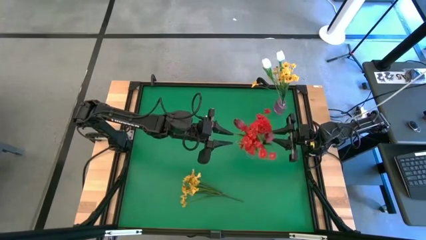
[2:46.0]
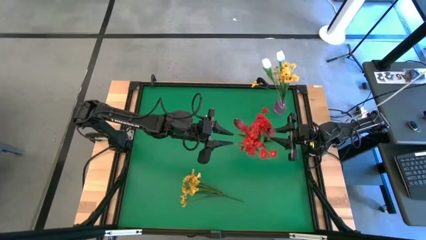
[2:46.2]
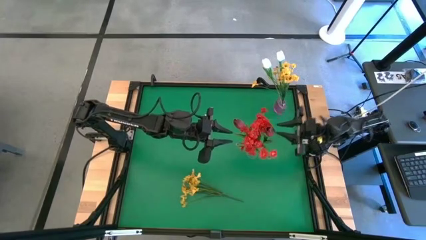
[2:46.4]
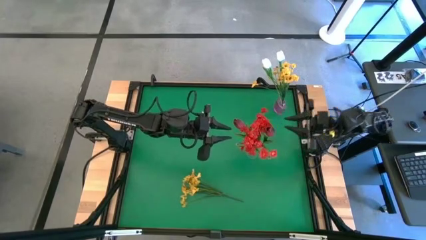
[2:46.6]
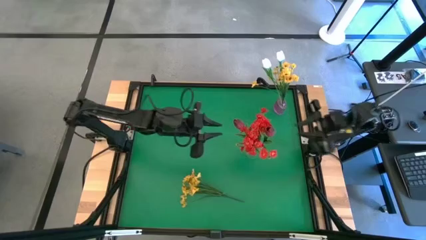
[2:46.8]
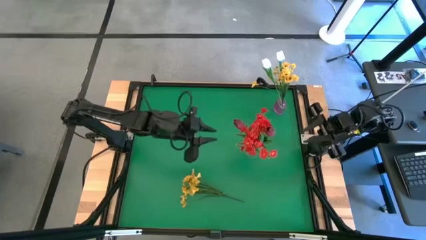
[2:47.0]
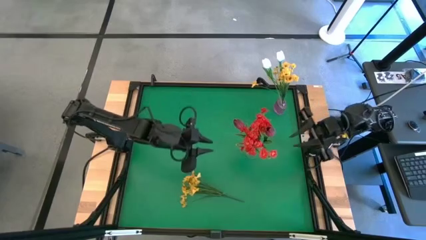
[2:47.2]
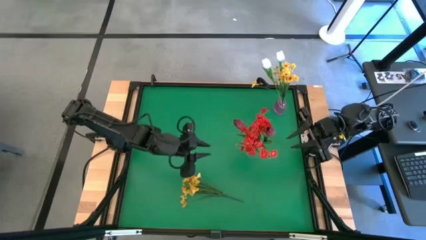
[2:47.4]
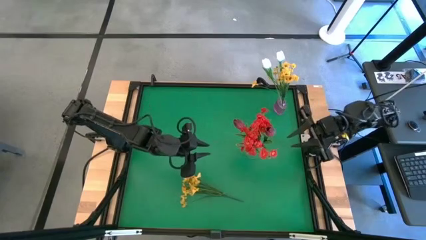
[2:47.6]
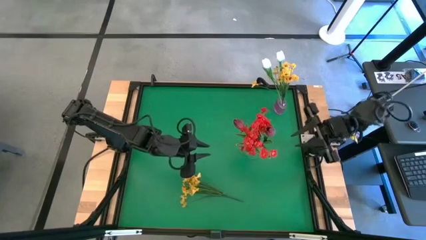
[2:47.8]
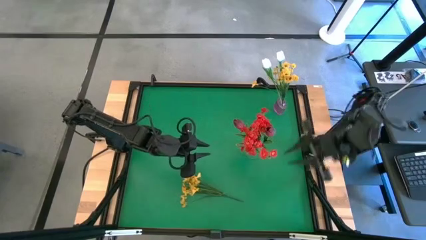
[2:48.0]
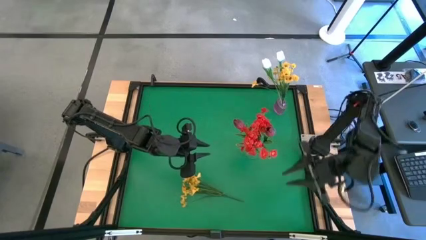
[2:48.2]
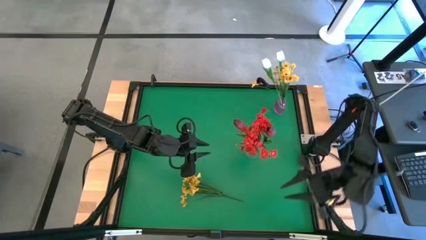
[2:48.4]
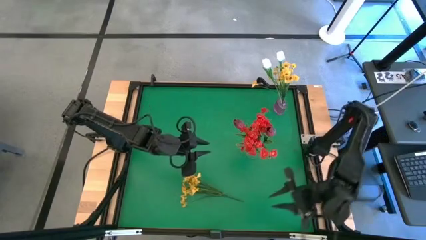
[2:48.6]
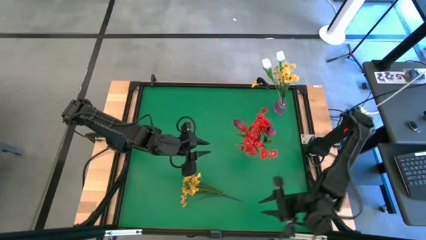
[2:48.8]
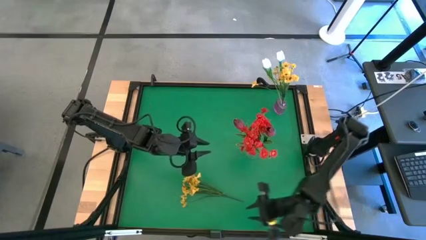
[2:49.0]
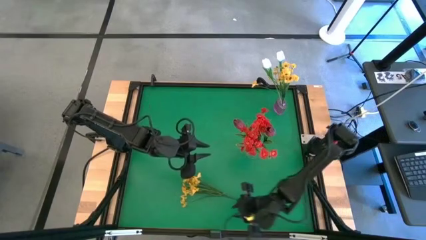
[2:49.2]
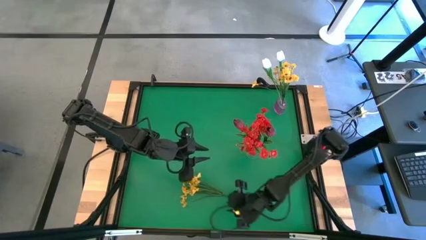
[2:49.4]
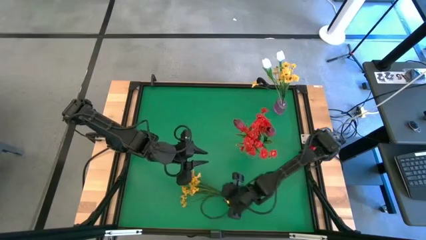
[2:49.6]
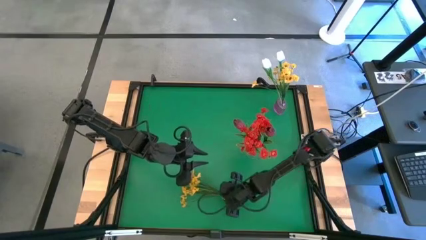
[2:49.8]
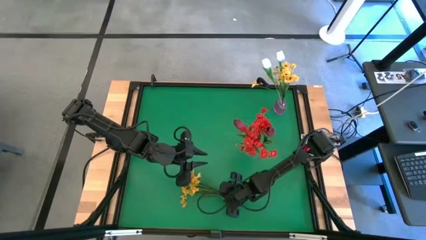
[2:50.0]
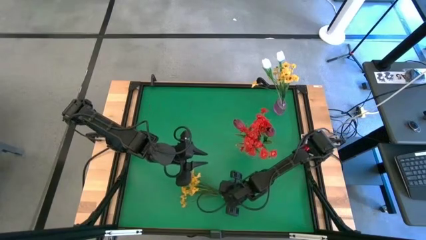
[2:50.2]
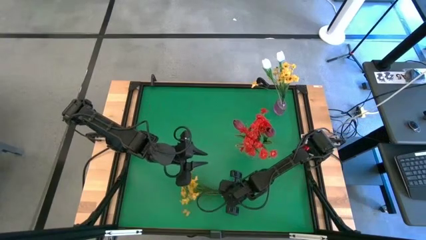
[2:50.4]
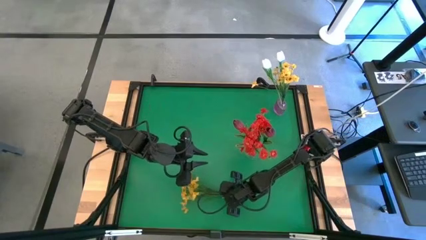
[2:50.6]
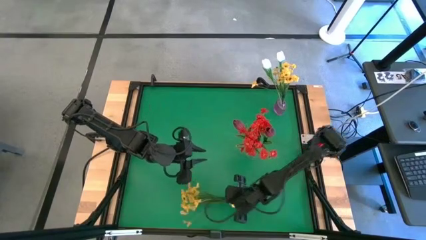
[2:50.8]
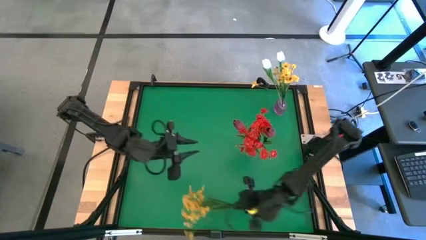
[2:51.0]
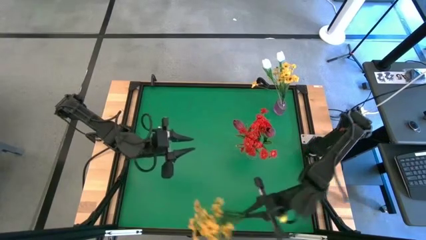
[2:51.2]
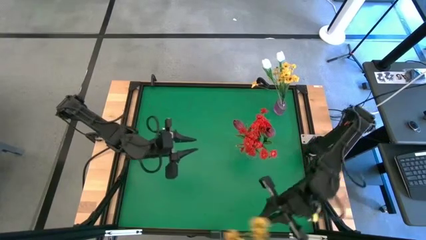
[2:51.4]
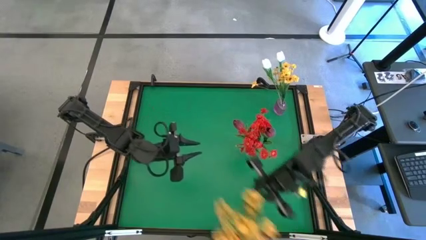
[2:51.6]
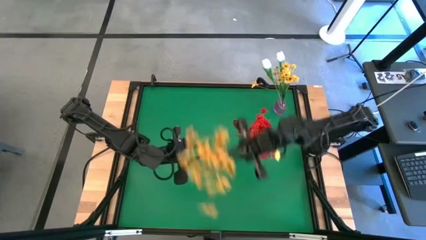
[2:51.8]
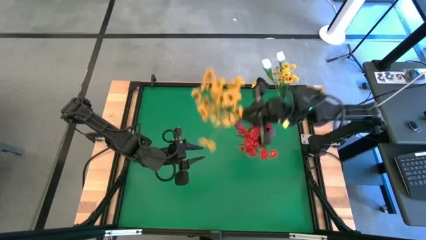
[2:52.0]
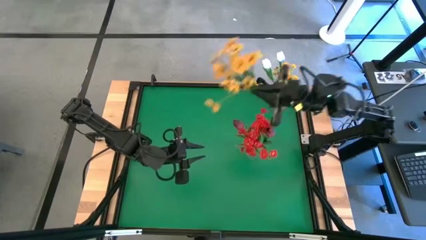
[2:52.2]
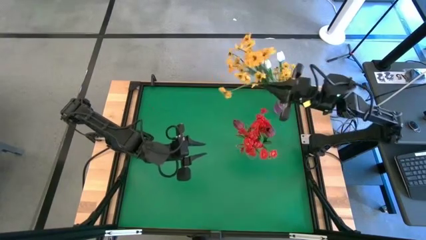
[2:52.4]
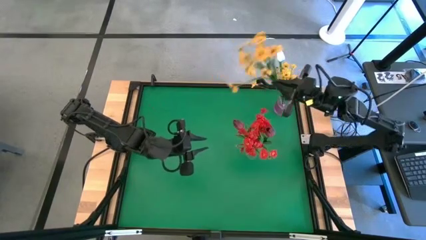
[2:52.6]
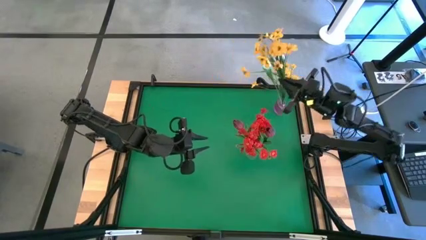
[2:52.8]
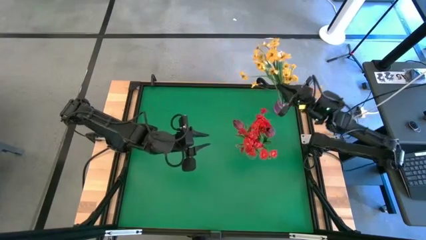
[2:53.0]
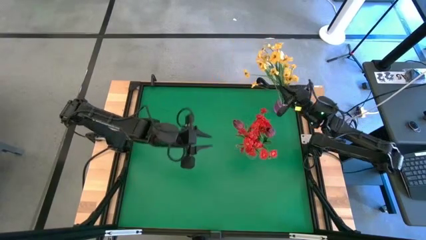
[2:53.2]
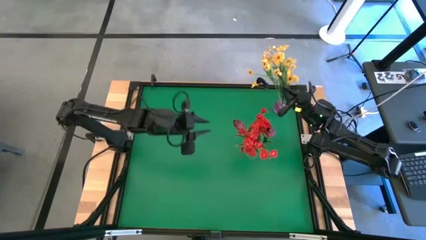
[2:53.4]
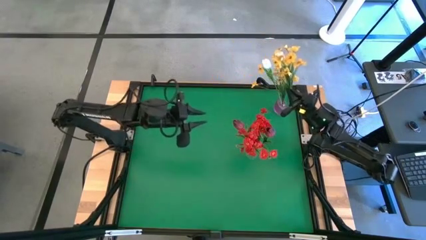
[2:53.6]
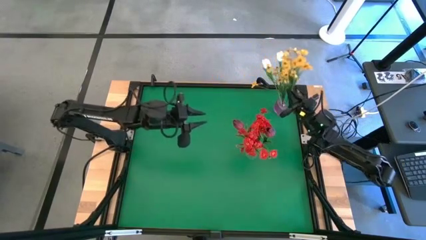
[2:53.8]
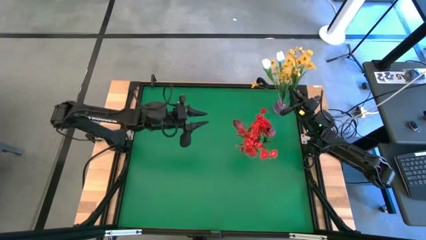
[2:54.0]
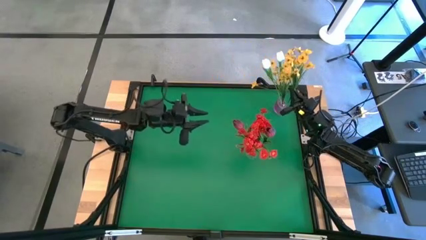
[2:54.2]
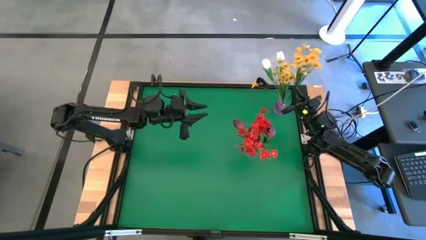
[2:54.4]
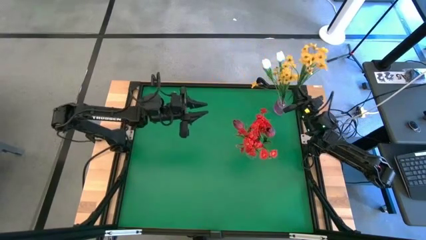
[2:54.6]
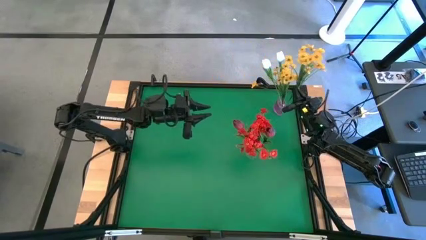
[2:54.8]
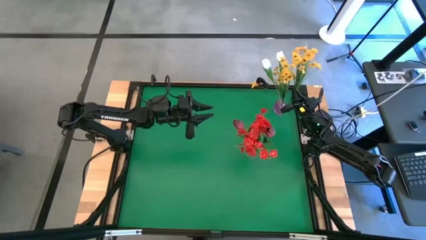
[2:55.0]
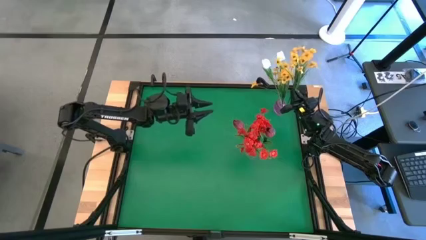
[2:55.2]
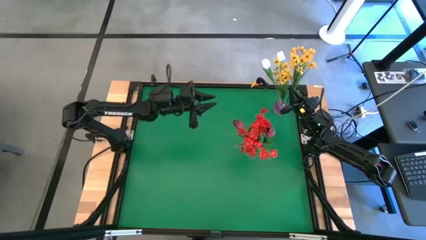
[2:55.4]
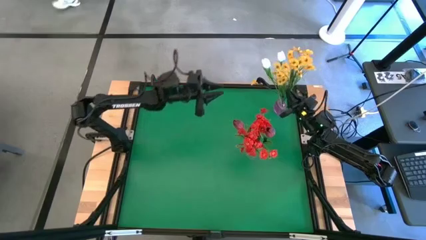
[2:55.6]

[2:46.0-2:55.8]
Task: Sort flowers into vase by color
Put the yellow flowers into the purple vase

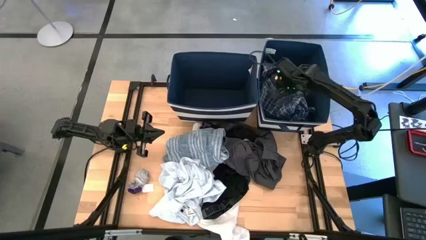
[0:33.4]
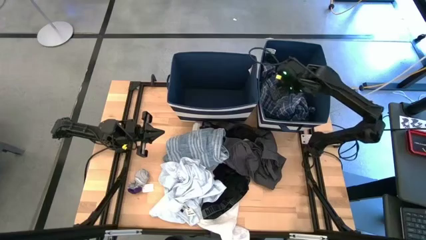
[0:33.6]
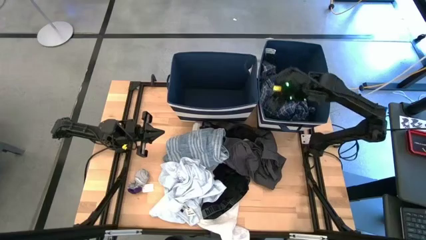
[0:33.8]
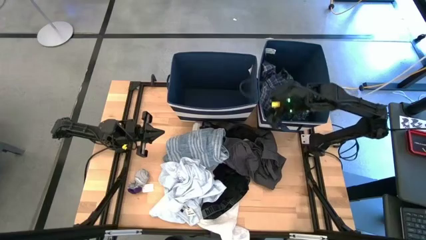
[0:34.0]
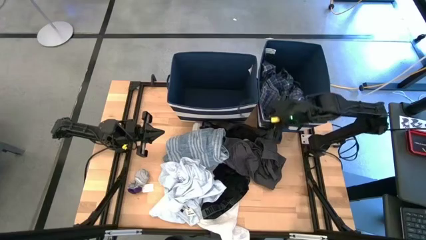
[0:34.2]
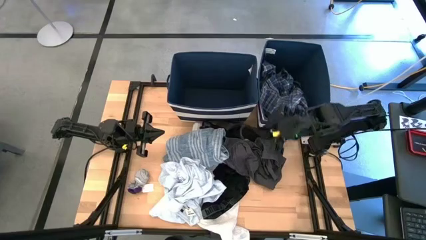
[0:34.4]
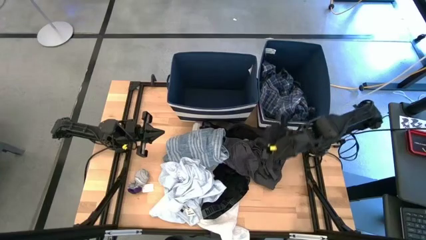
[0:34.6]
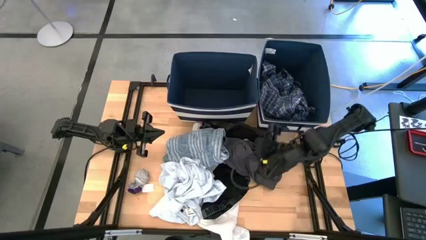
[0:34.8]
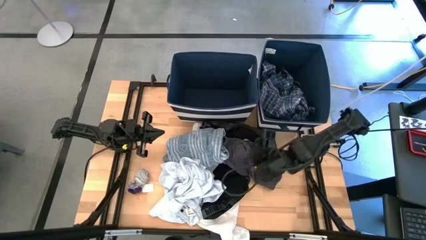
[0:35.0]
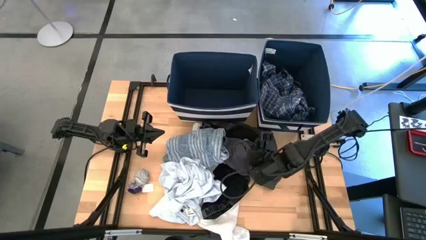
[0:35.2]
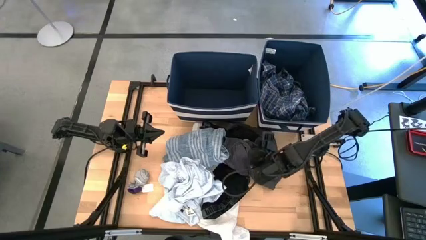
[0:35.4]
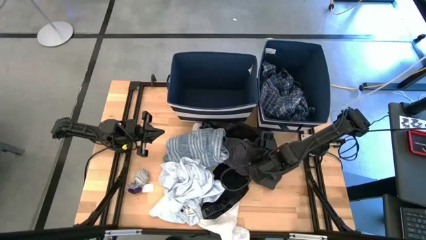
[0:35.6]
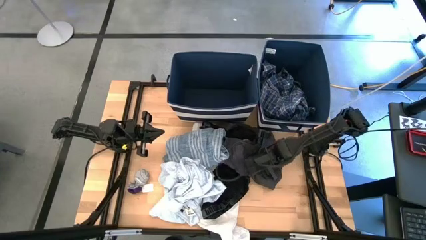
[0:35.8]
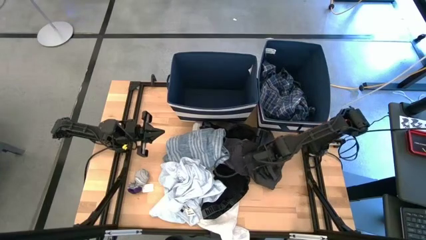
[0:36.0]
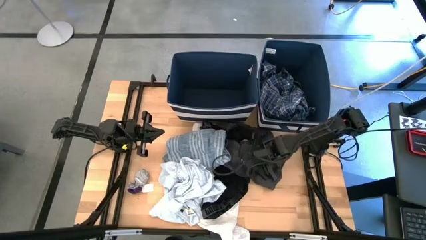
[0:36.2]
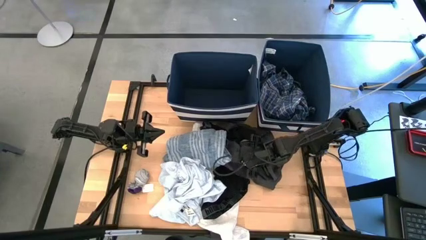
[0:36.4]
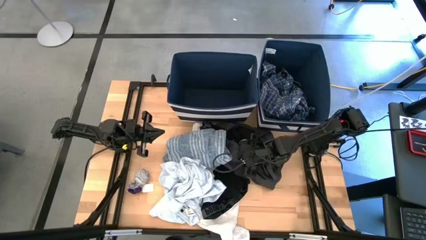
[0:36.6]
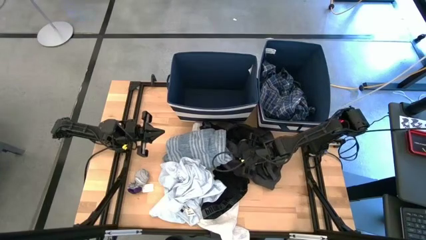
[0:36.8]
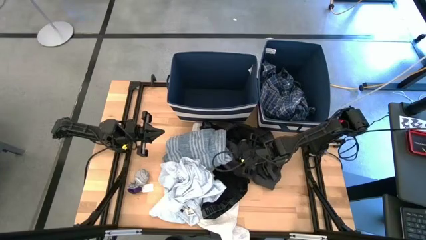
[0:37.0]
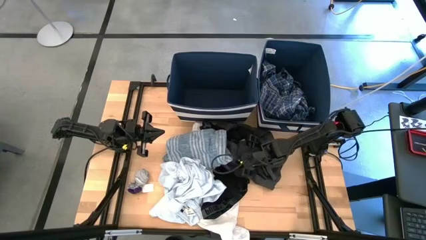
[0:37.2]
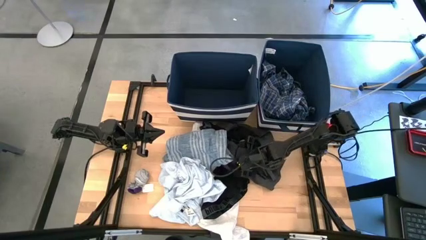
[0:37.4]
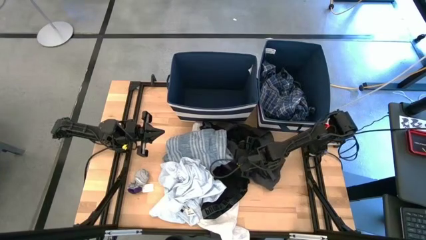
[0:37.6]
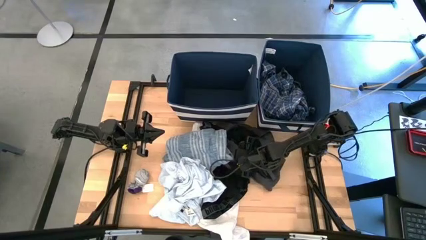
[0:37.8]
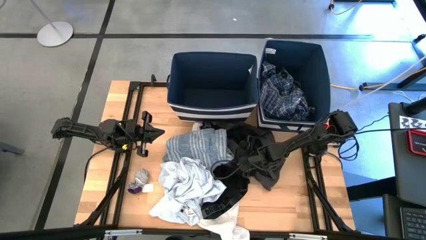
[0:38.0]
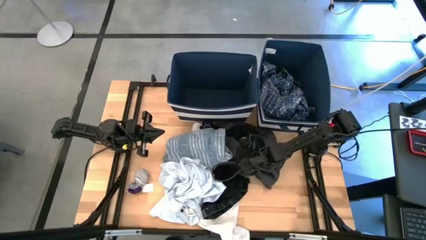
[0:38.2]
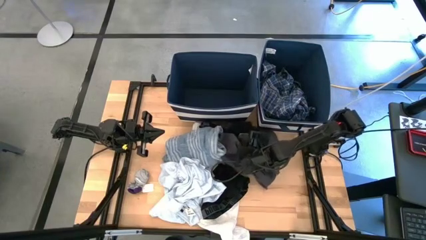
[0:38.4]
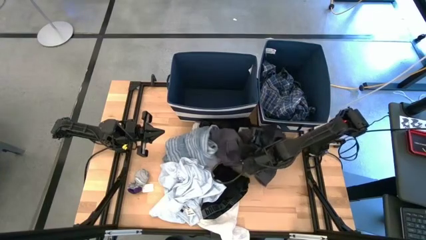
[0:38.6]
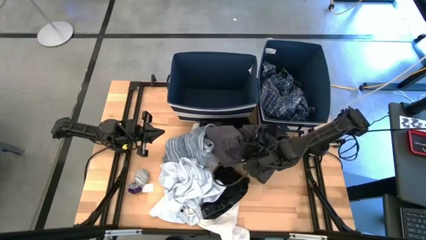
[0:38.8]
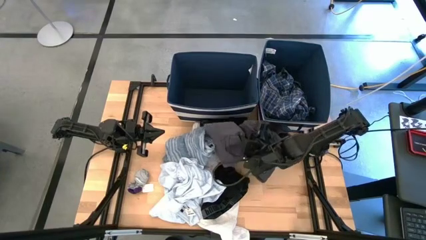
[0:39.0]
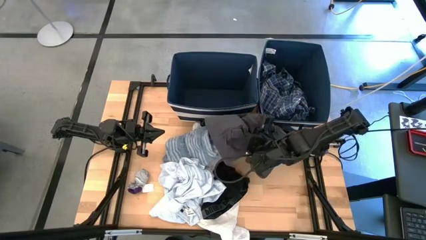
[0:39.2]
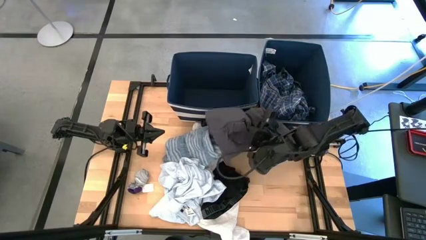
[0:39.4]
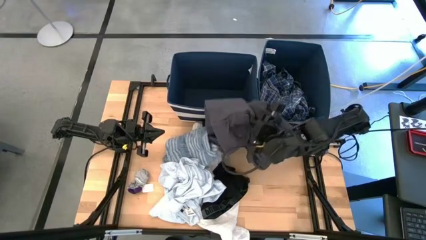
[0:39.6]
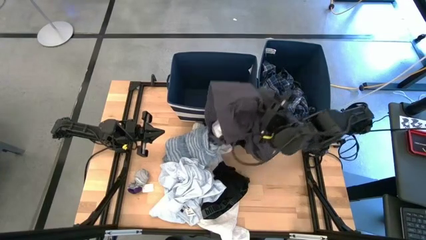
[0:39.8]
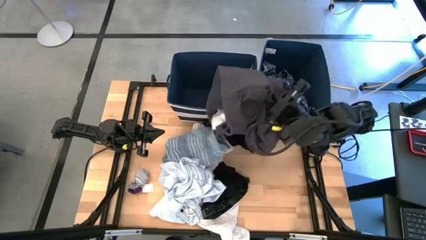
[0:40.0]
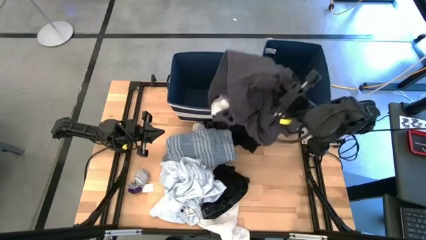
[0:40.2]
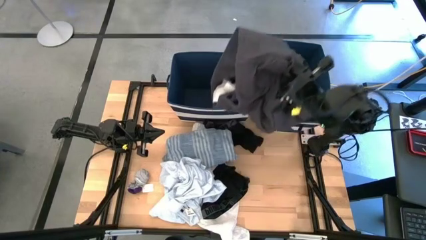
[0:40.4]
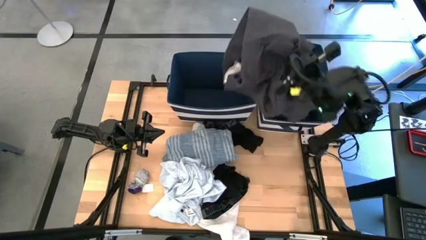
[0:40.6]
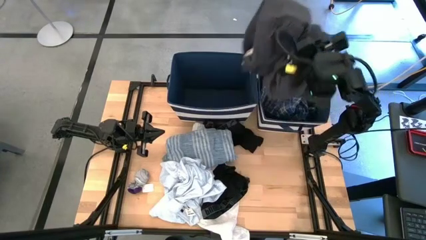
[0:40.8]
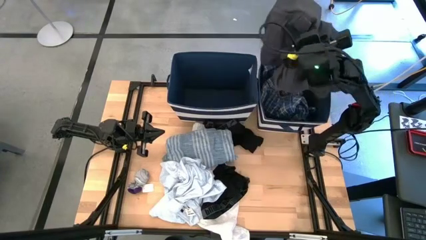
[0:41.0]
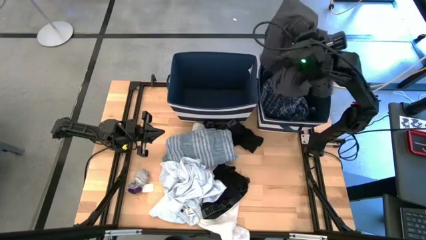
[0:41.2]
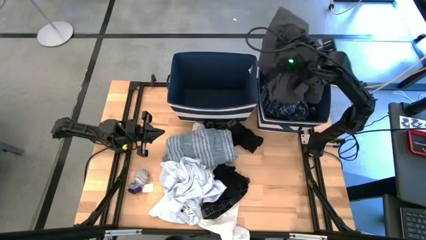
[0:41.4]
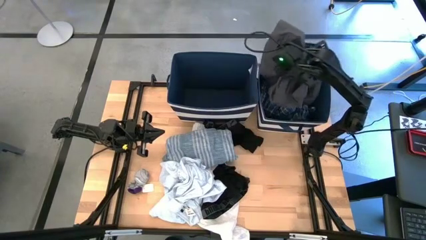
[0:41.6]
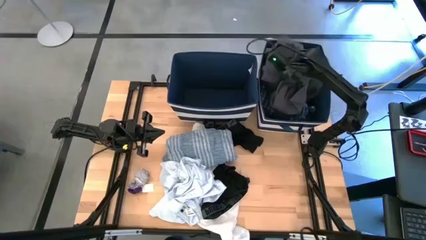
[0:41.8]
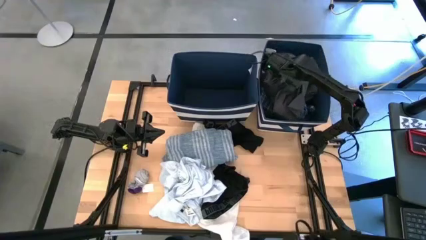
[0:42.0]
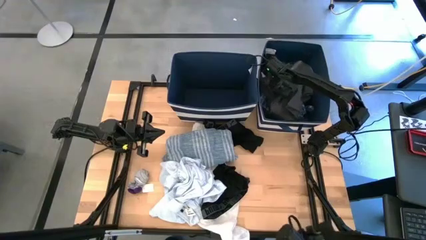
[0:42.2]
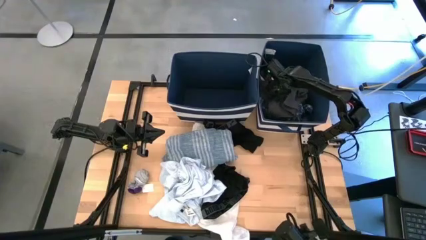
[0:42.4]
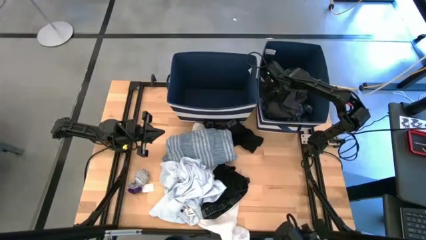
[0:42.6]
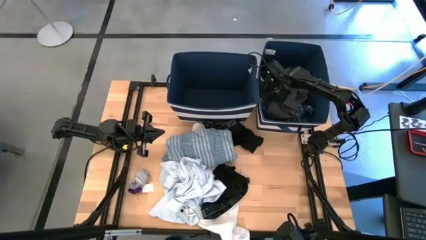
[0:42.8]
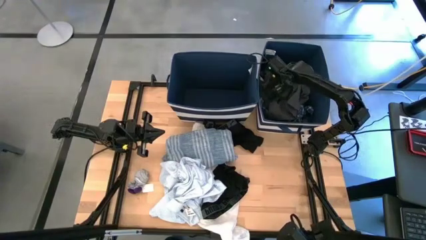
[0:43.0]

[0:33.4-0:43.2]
Task: Sort clothes
Put the gray pants into the right blue laundry organizer
